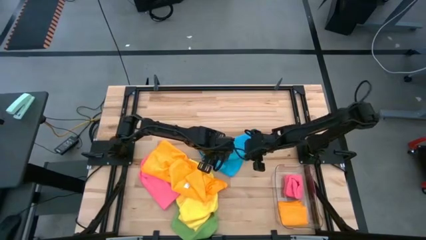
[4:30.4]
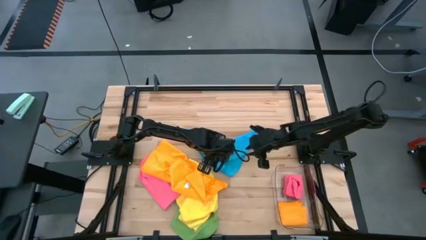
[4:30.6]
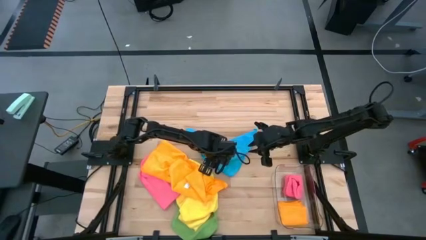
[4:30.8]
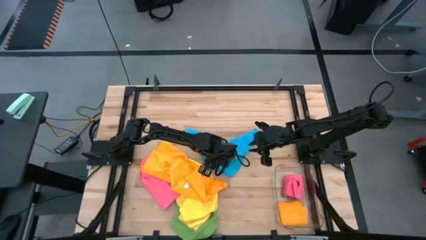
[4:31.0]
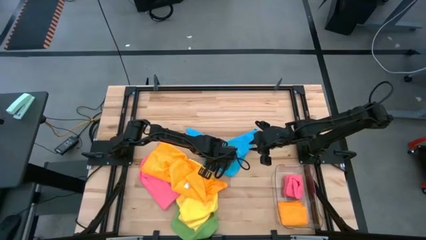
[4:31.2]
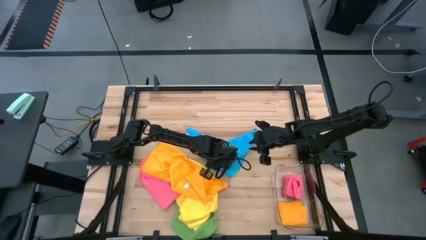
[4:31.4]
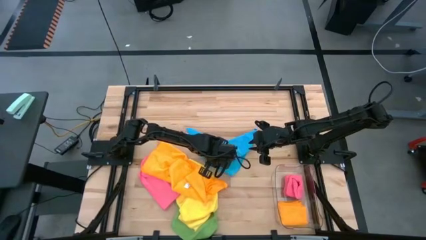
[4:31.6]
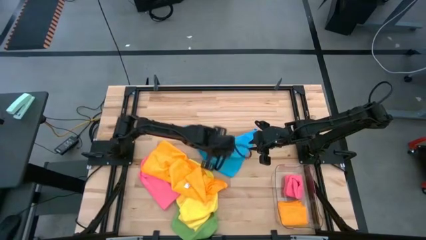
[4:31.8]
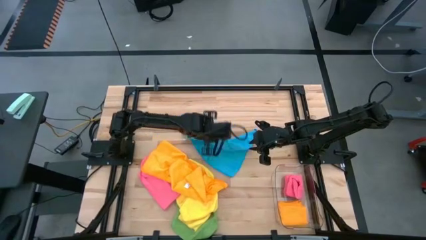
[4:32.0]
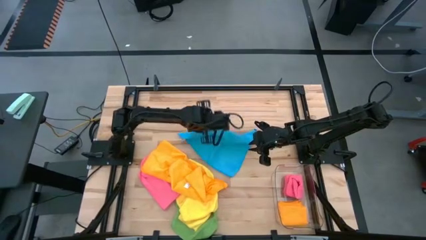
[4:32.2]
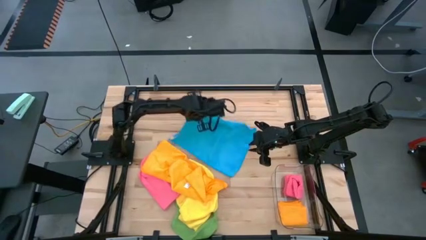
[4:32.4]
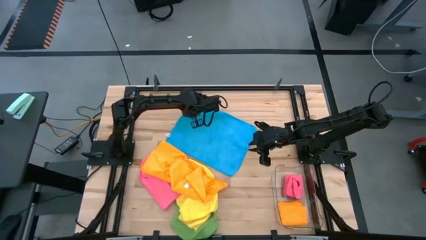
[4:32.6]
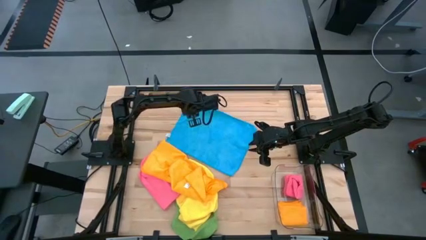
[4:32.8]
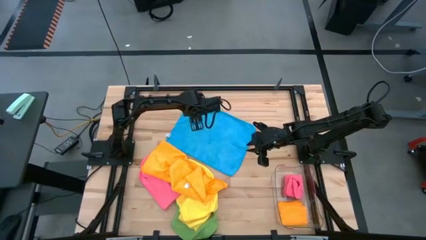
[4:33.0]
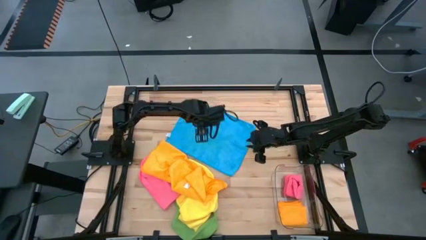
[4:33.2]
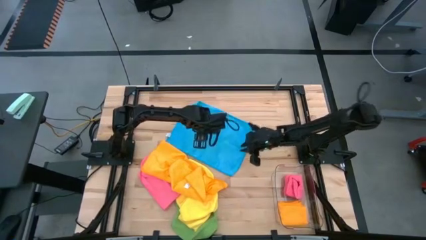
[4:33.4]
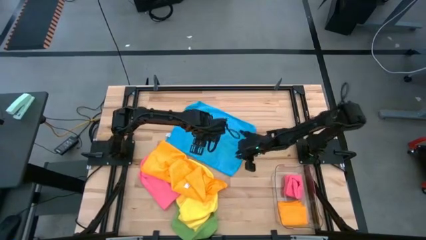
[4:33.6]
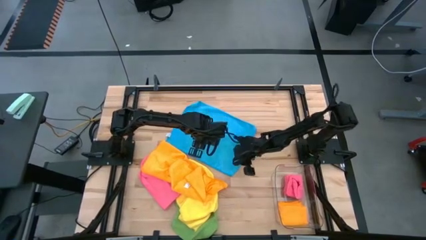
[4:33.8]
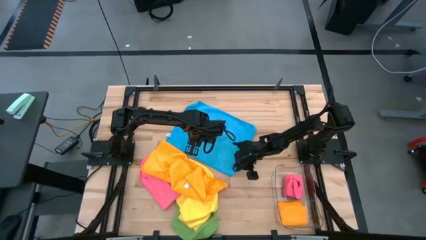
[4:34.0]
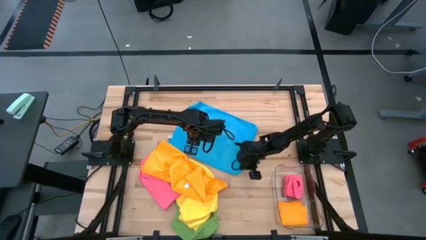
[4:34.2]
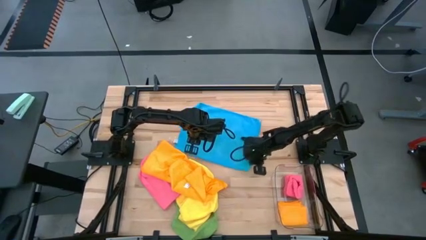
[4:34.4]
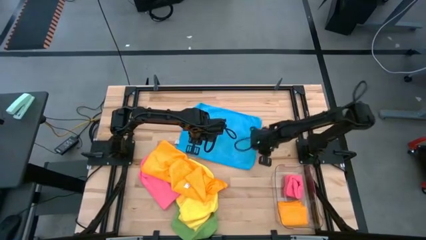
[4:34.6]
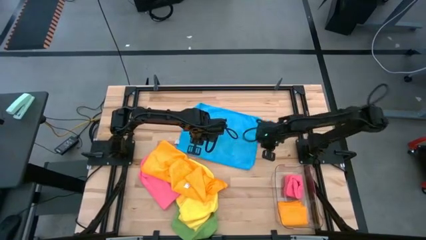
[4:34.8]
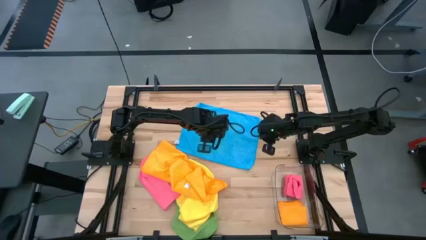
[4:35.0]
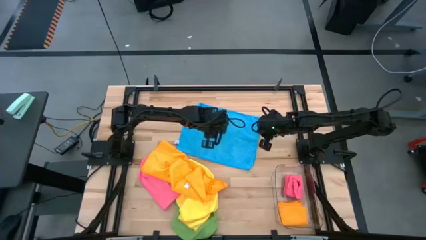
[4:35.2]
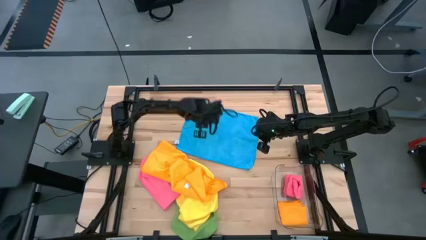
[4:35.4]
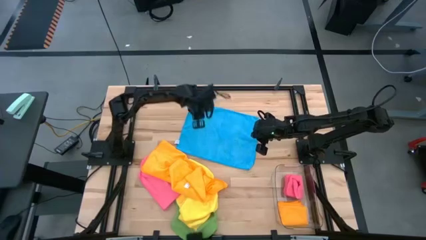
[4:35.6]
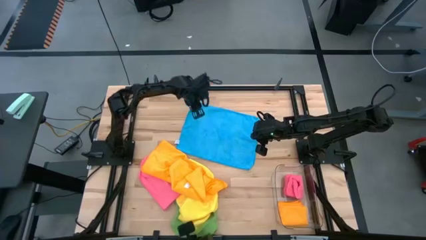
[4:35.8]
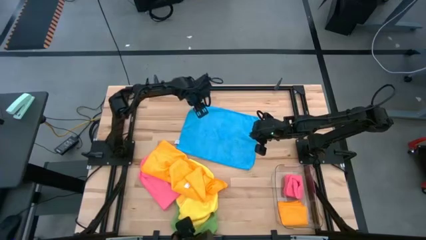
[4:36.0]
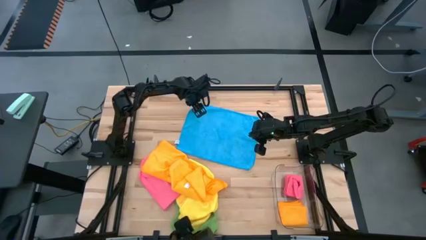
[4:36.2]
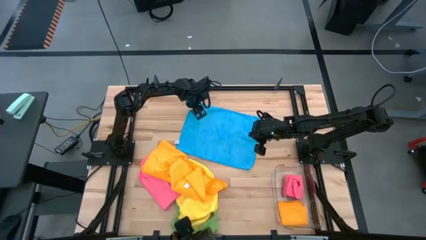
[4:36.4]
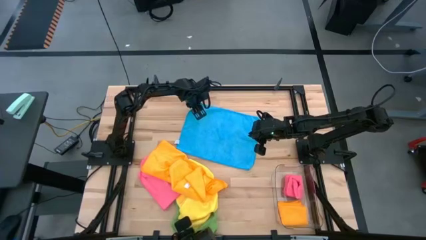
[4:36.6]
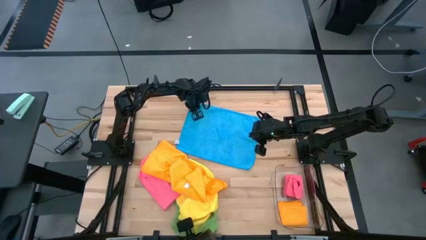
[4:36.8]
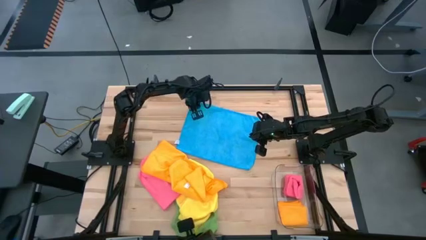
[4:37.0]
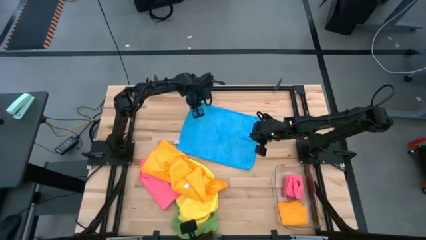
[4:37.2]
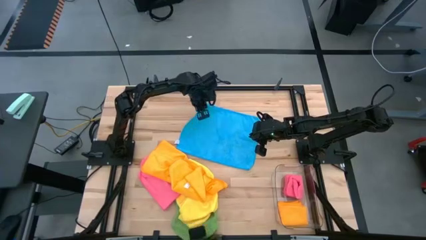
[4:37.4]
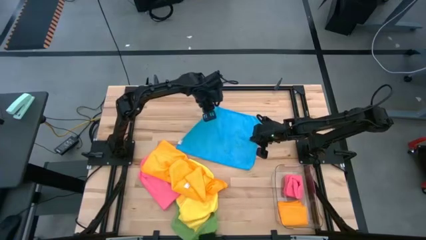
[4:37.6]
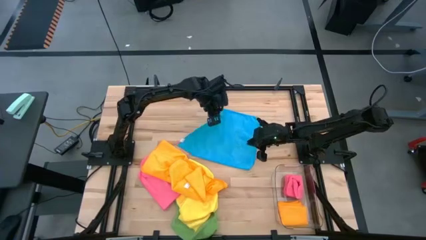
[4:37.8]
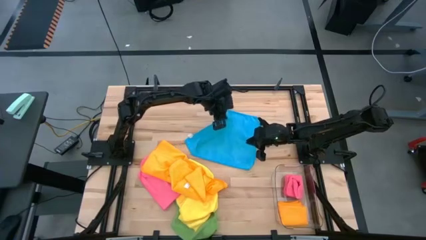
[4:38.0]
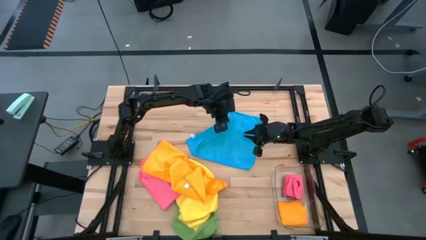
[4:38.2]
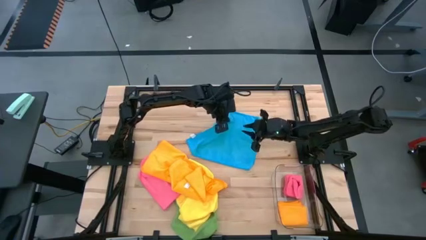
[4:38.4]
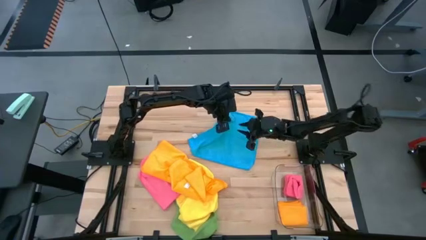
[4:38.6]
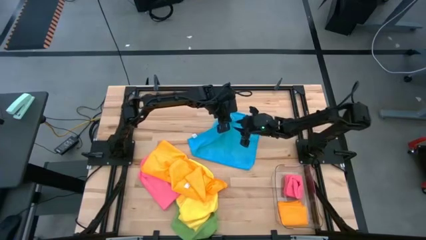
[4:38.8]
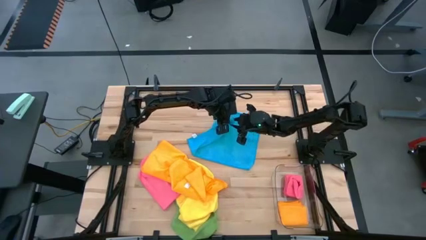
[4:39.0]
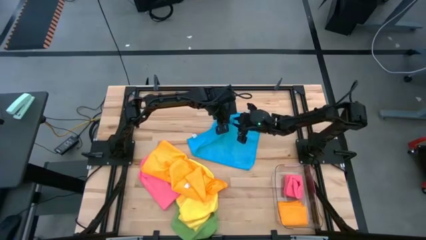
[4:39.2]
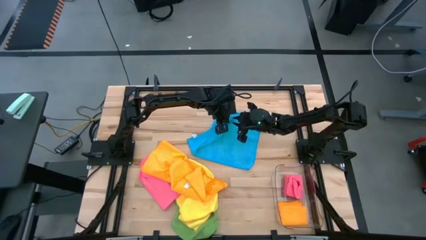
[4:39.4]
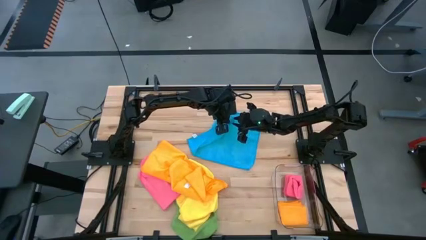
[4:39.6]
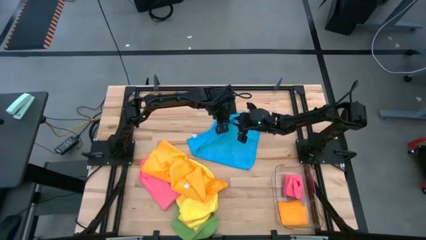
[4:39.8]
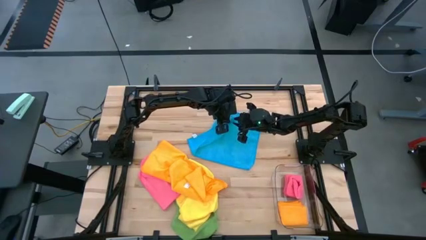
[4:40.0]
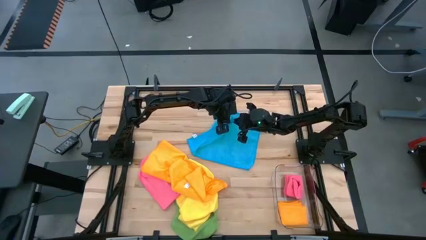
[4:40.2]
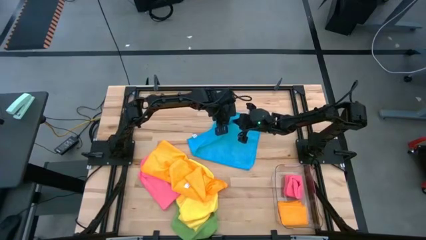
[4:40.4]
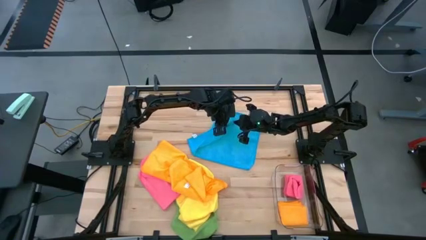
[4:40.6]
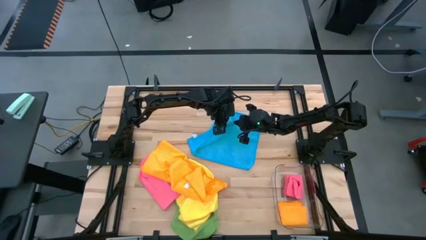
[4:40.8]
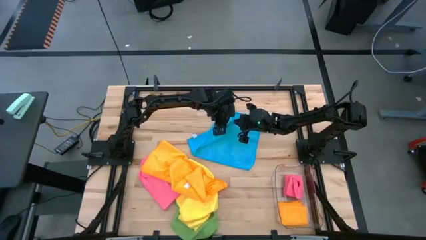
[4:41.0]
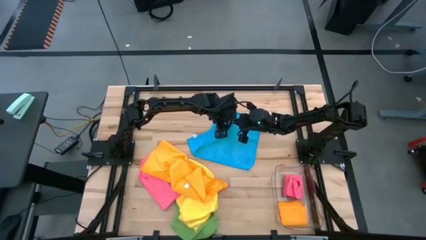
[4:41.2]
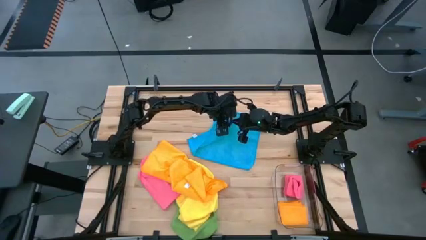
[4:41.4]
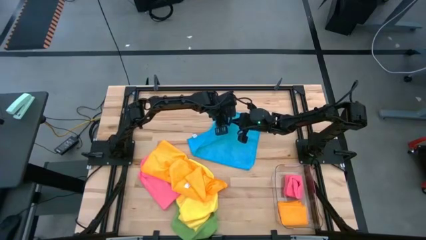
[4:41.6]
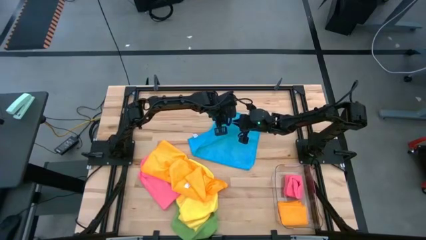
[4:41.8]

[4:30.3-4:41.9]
Task: Fold microfiber towels
Fold the blue towel

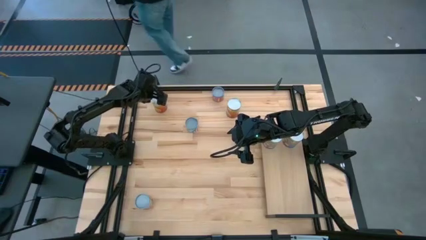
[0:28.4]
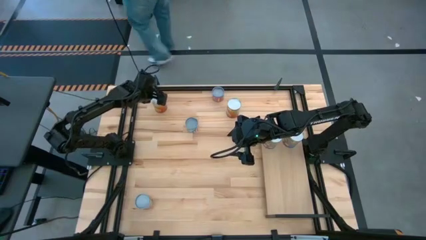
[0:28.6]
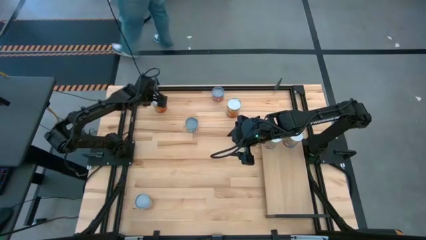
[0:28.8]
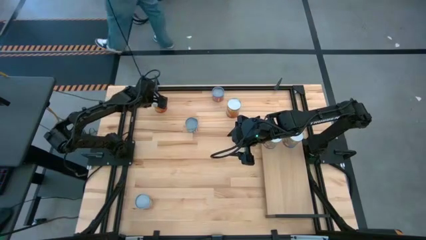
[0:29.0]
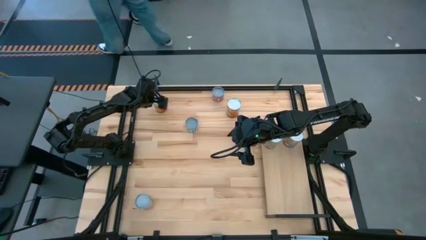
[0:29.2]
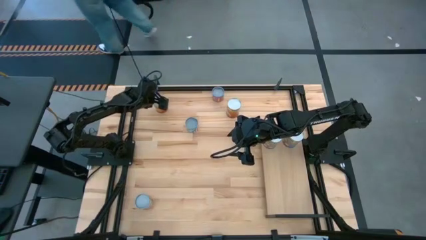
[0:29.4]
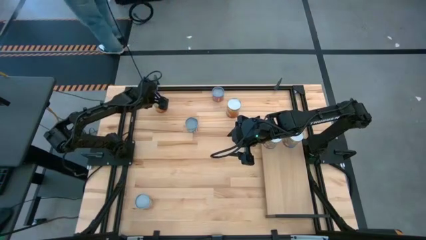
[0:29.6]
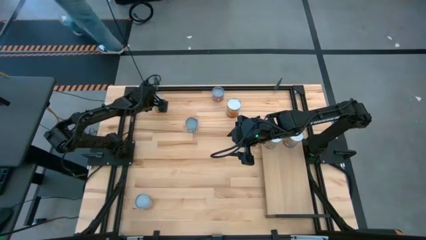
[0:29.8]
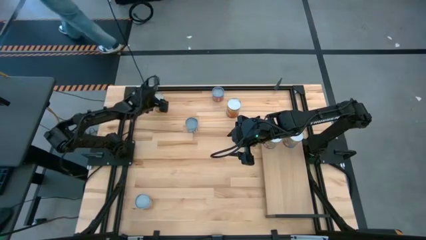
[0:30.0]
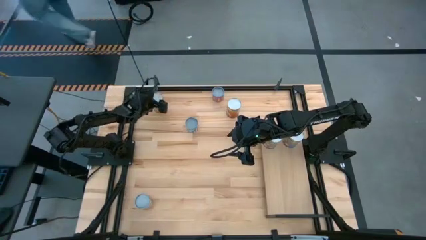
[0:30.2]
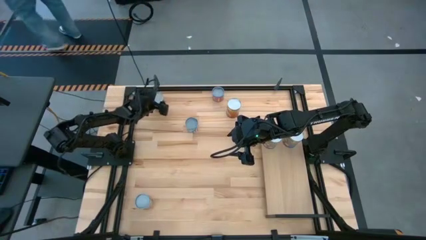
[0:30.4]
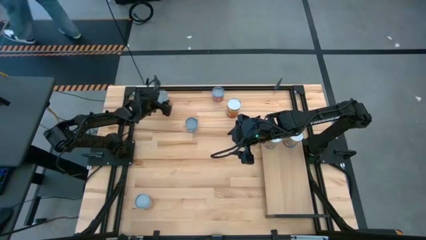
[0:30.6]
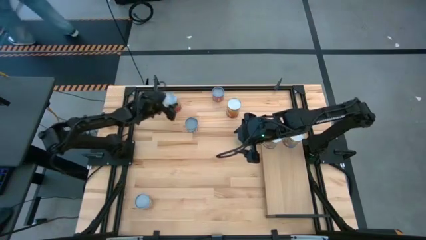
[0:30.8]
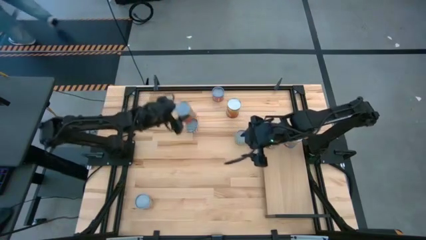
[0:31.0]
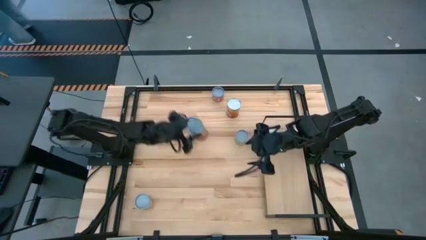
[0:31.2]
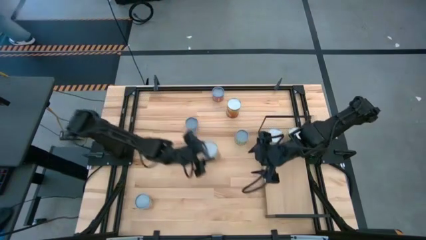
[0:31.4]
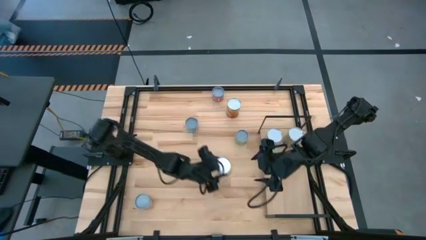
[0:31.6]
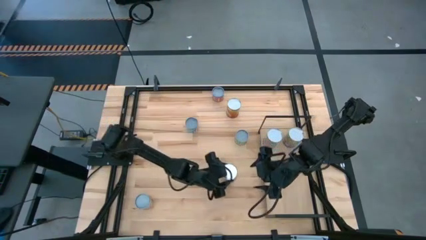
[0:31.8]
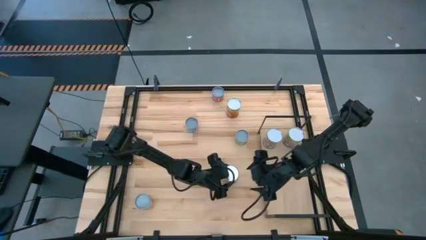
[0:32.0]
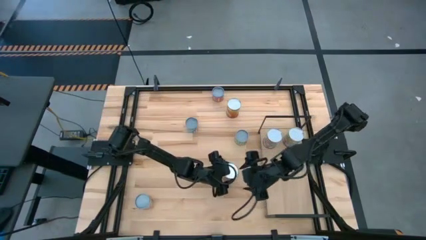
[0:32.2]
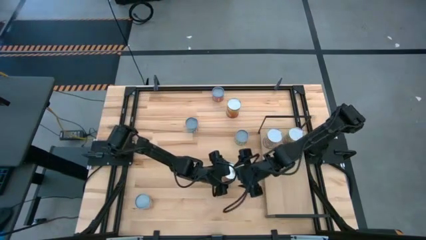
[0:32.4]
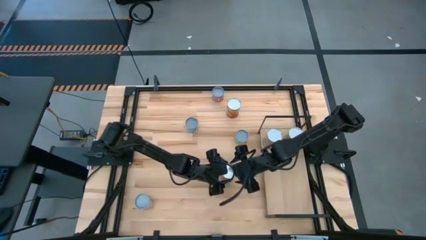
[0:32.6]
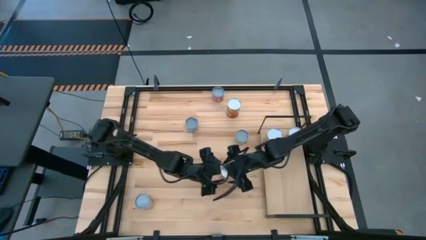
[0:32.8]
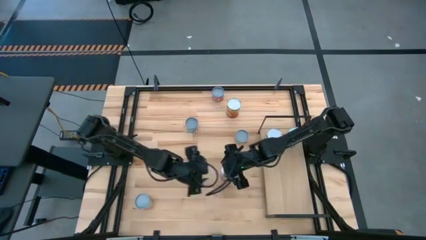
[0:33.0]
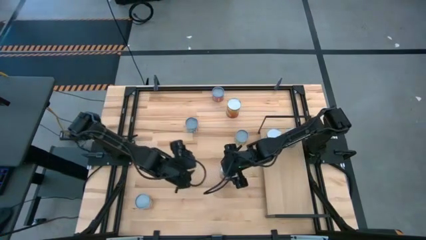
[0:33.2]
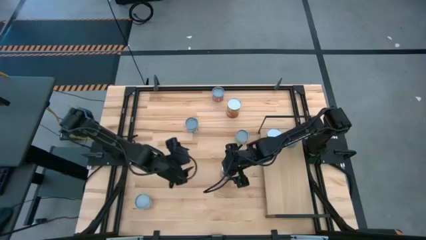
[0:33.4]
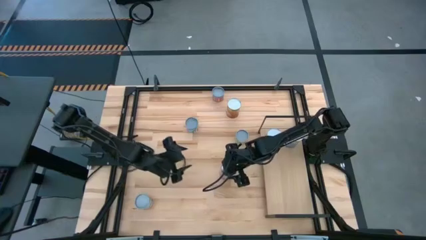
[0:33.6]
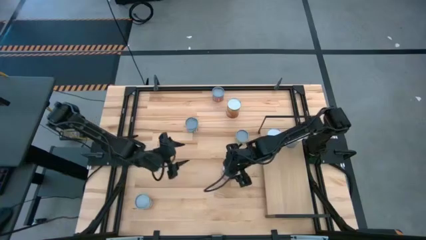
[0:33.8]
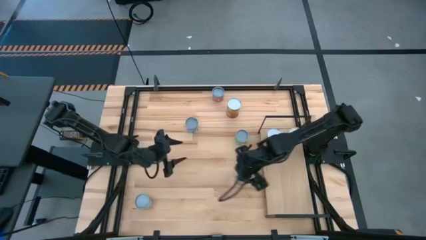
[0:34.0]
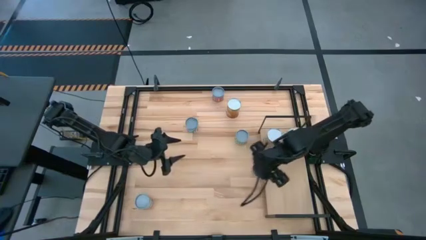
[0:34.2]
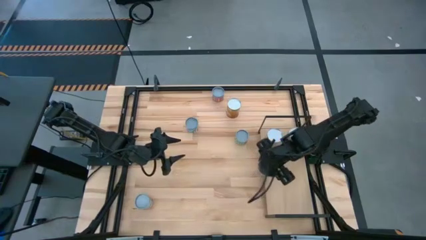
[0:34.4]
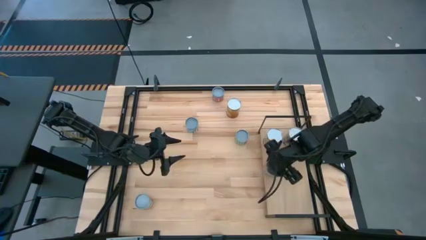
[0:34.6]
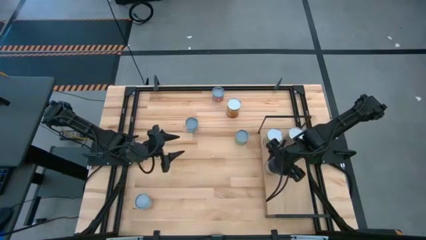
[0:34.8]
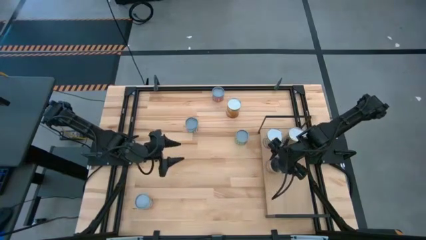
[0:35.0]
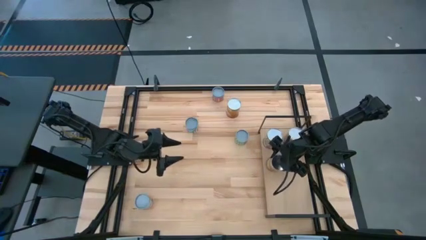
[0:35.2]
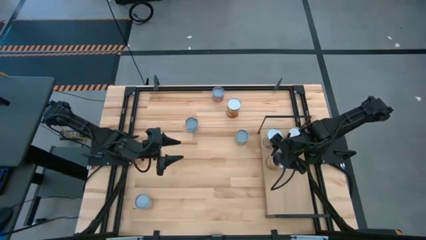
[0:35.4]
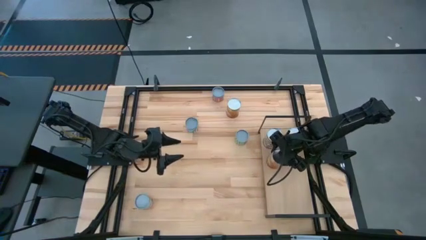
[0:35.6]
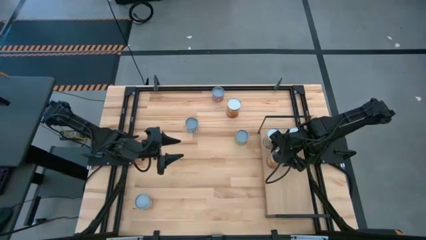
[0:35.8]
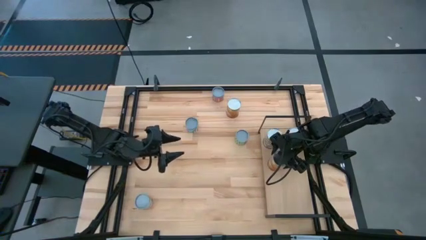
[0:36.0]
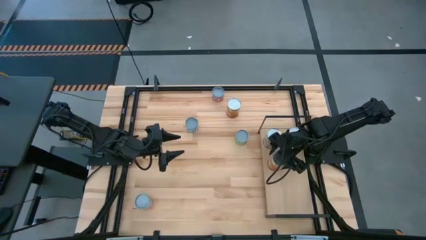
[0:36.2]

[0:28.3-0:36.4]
Task: Pick and place cans onto a shelf
Put left the canned corn on the shelf
